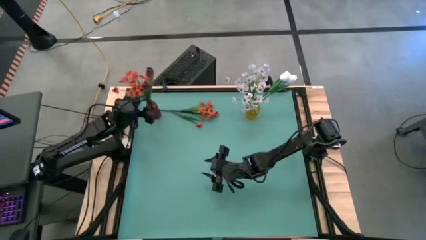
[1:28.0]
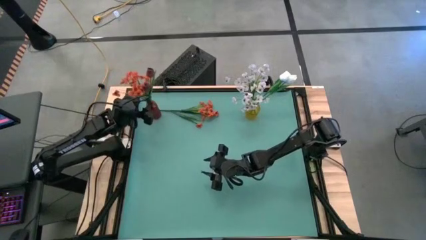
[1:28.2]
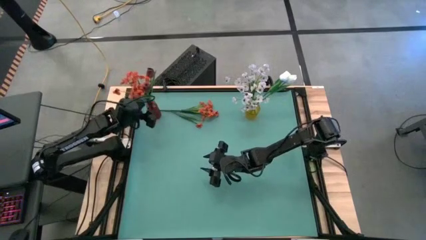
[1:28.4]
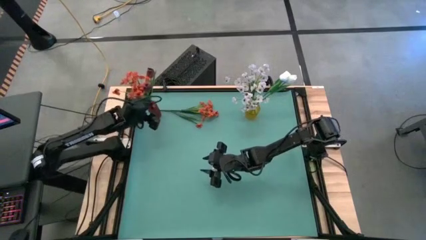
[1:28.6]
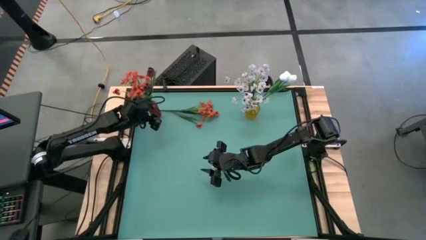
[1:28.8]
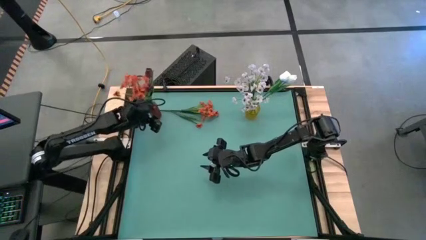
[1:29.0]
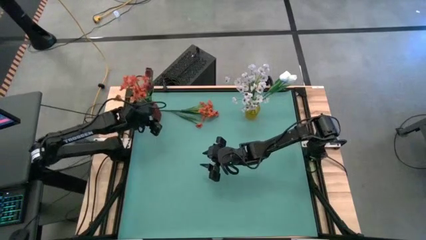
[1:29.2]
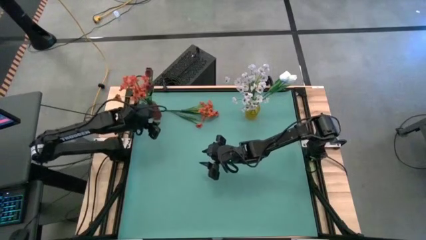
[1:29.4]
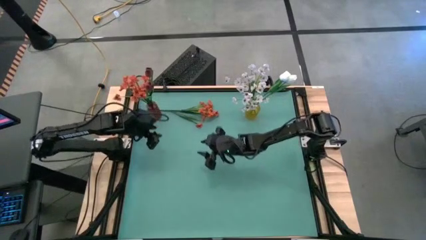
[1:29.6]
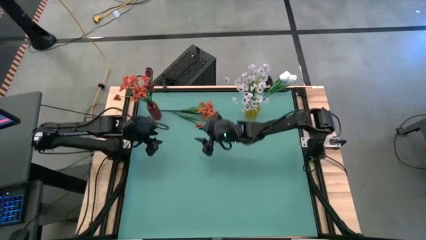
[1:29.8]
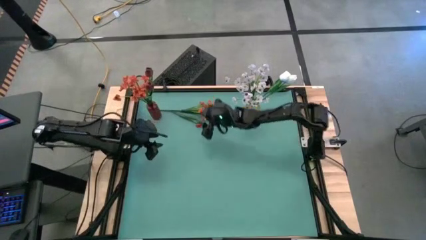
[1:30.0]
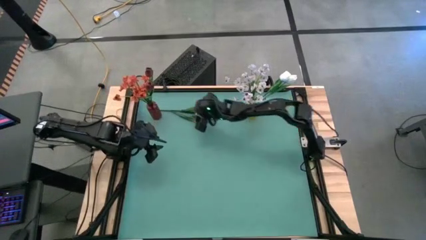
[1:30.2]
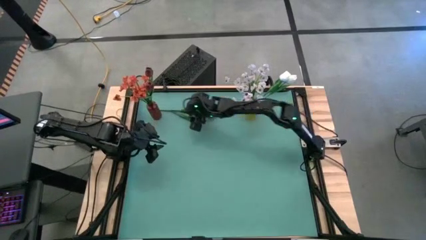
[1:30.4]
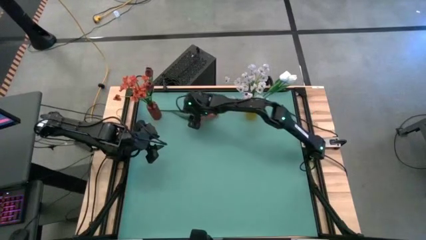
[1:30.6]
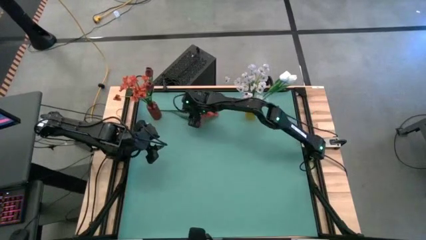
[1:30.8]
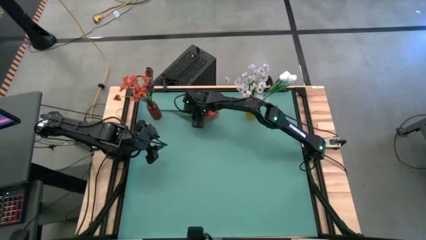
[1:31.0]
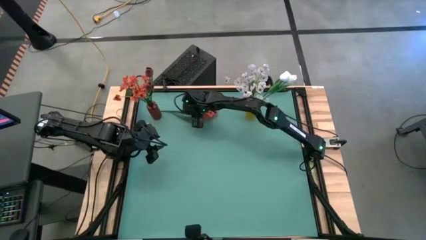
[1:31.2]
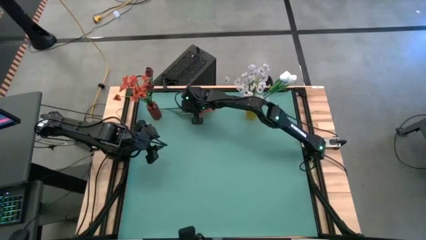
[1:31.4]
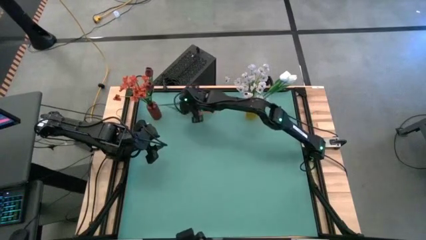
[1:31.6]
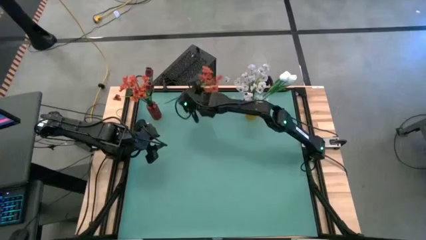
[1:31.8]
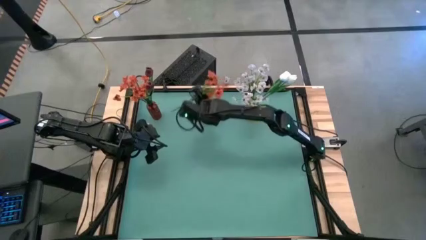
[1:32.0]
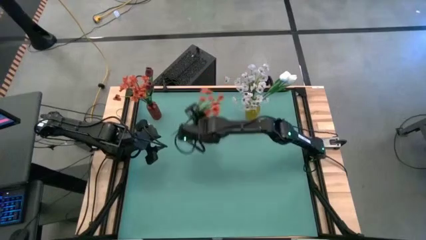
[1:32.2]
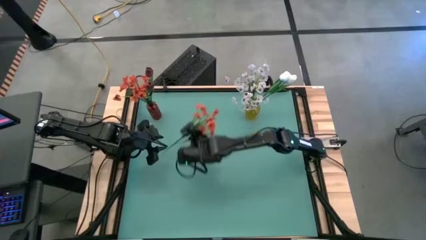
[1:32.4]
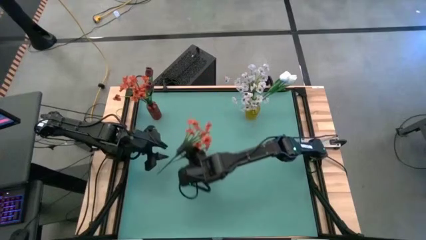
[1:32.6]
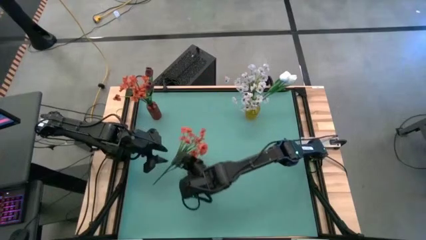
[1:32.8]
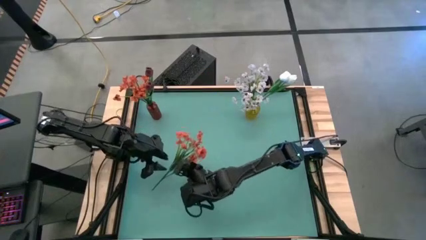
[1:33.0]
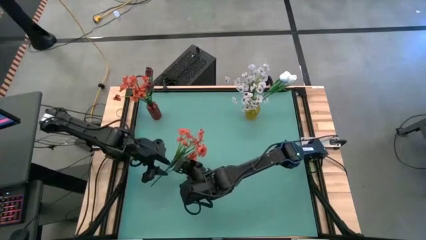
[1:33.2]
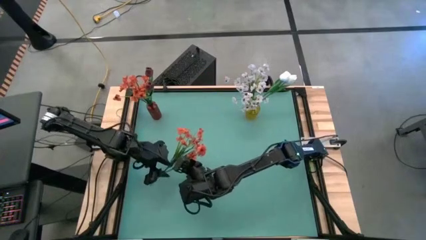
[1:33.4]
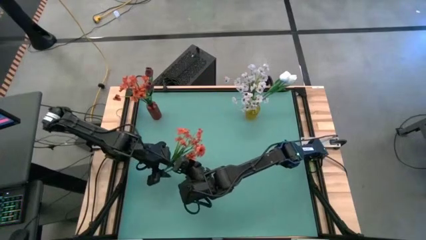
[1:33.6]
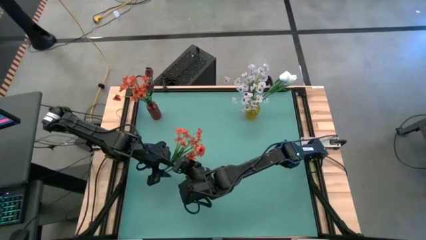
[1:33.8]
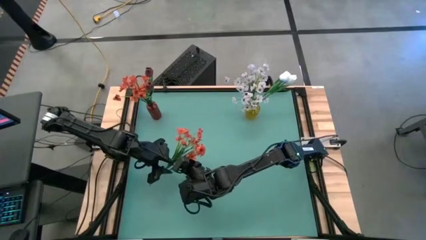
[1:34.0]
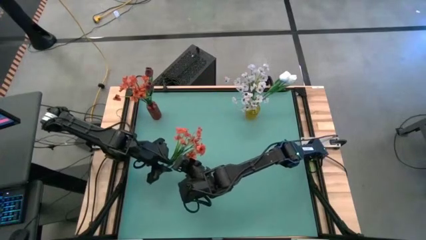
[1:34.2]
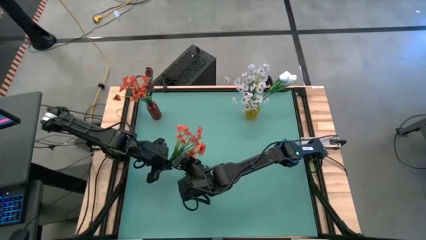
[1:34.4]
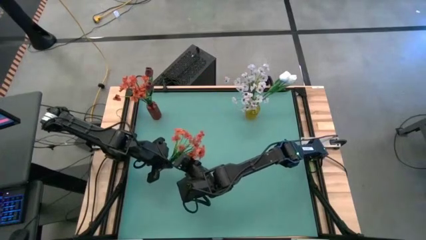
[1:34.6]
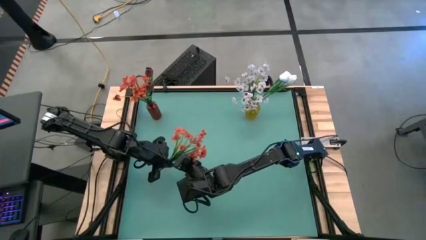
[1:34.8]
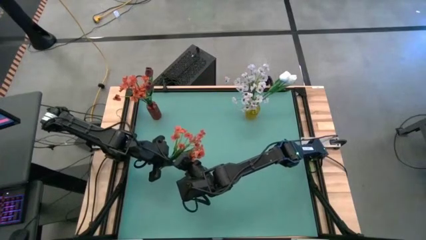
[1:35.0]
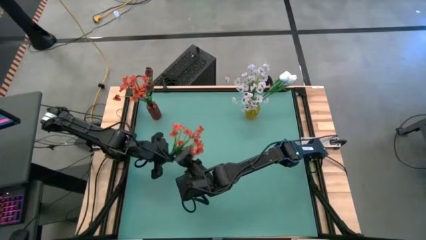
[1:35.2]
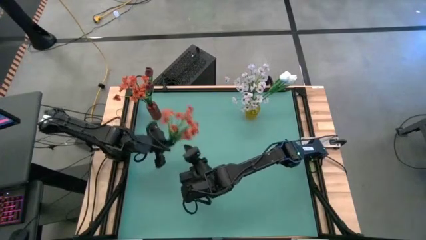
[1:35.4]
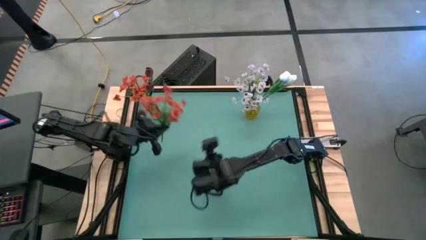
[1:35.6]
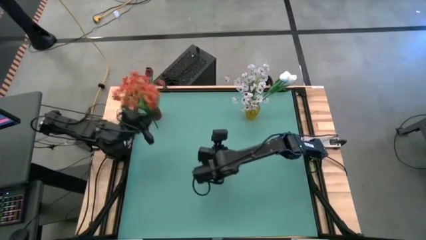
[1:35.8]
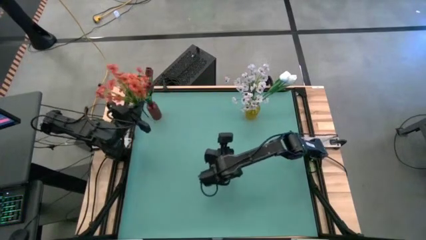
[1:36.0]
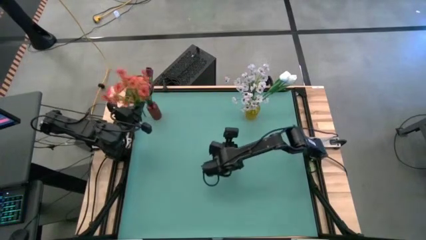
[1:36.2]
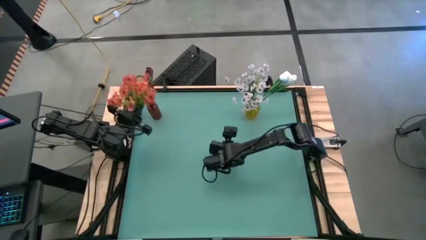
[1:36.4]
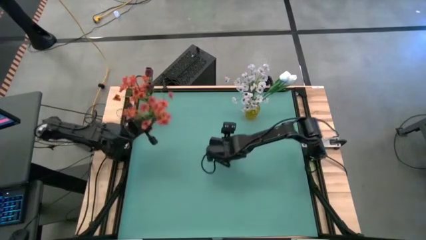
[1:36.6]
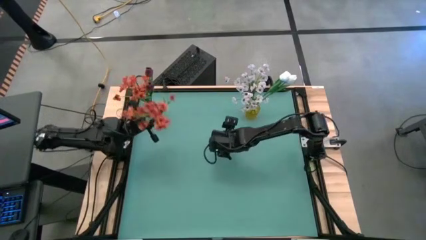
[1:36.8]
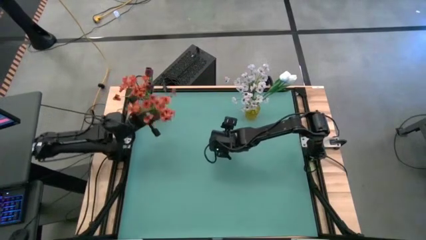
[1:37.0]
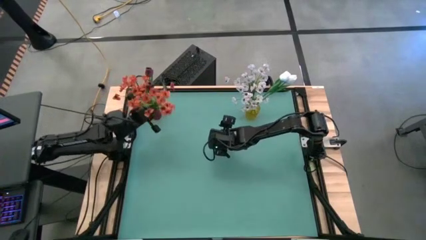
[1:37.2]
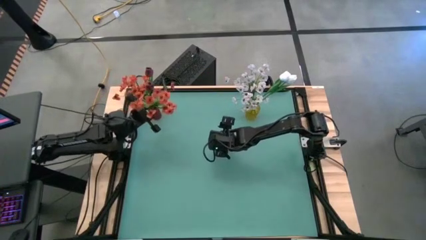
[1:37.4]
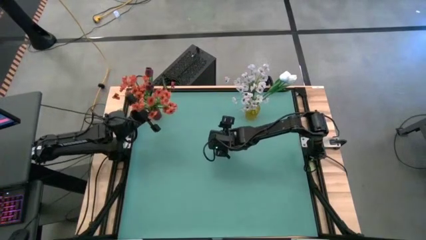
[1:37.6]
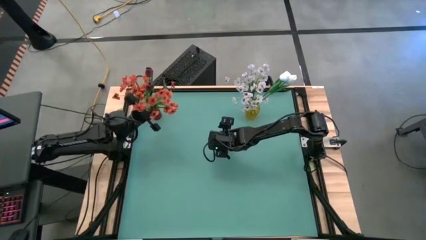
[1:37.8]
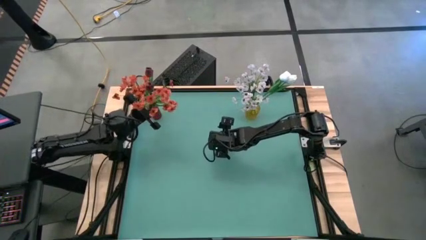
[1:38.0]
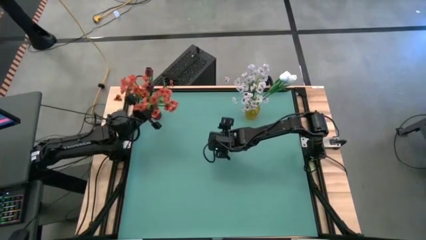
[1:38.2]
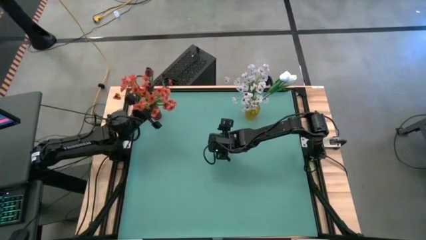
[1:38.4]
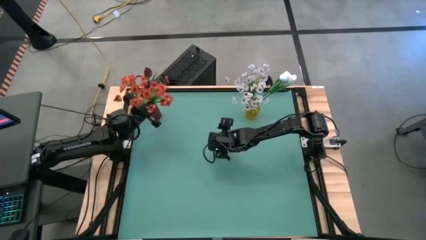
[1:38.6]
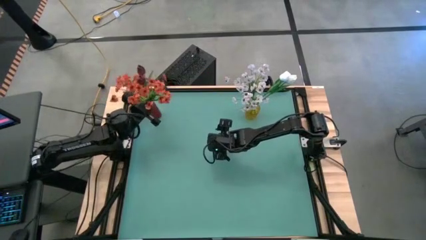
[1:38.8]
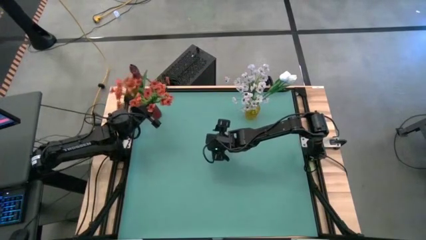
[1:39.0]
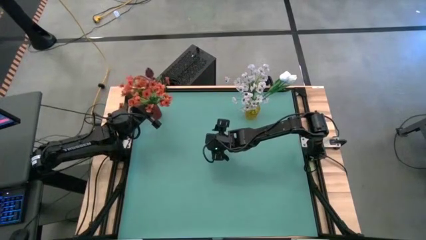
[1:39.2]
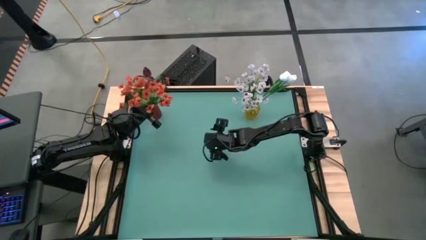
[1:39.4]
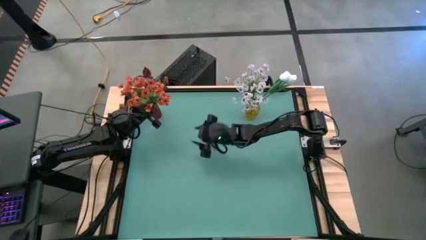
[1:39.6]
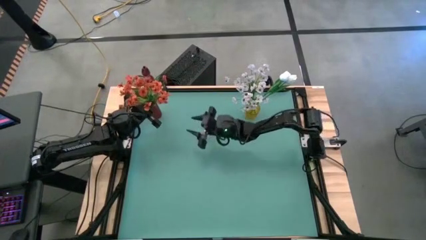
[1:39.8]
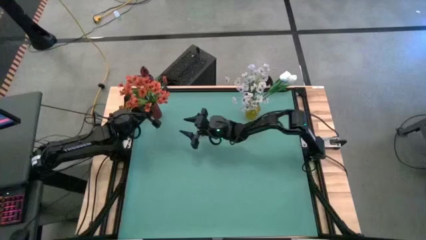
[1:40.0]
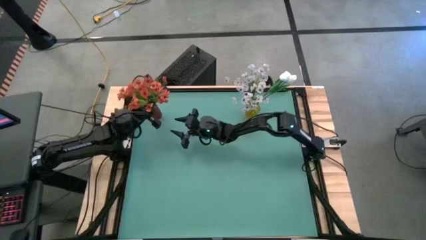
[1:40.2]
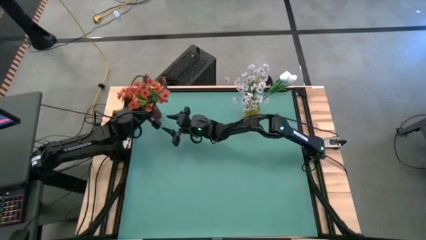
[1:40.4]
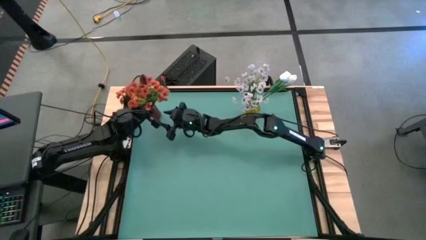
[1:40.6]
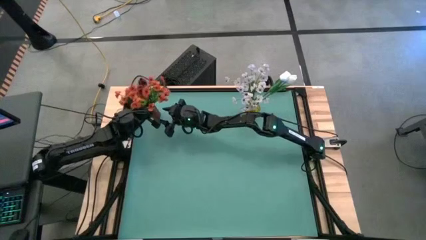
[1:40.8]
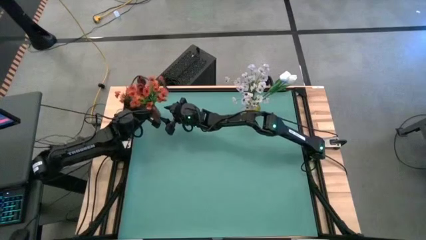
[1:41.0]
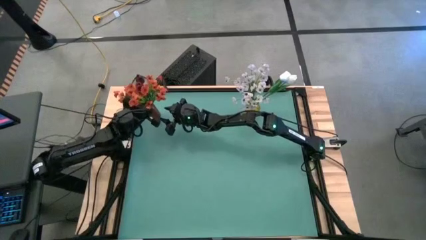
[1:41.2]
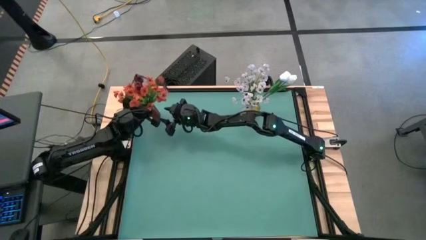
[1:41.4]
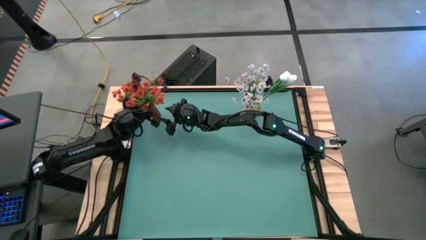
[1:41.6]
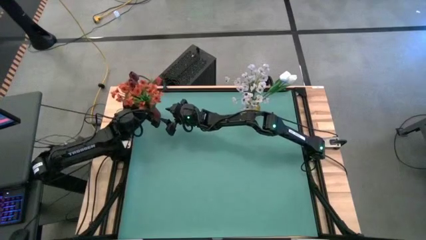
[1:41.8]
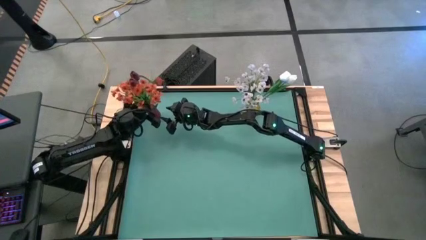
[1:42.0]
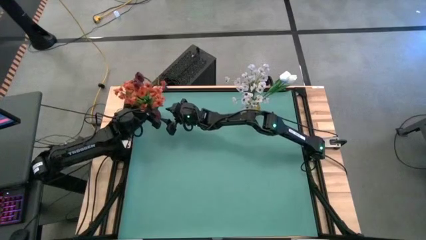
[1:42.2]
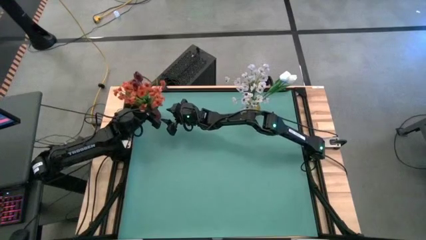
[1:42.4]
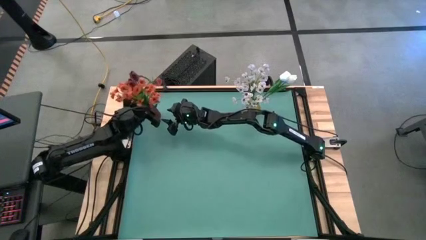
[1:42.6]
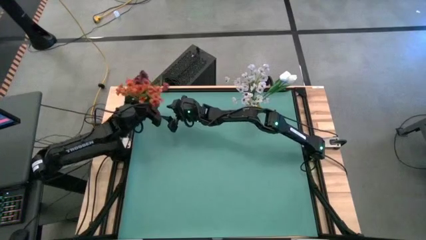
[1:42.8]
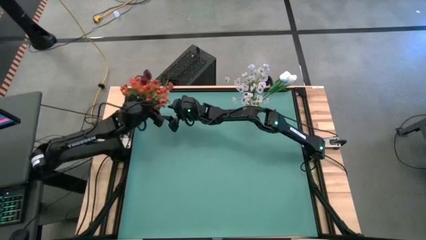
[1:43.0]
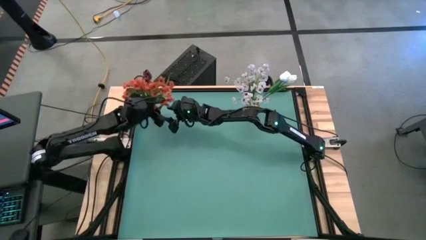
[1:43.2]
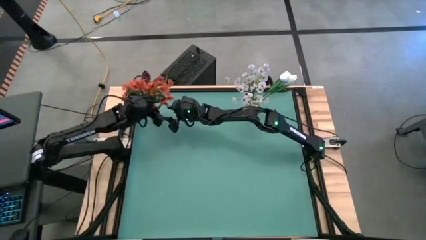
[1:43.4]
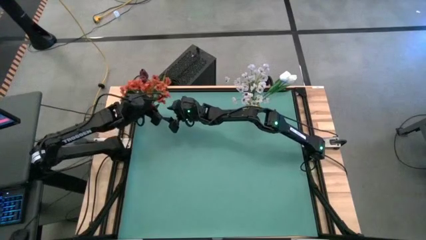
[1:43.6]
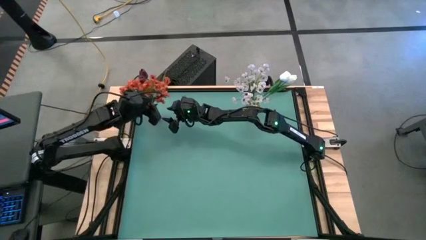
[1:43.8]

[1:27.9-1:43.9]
Task: Sort flowers into vase by color
Put the red flowers into the red vase
